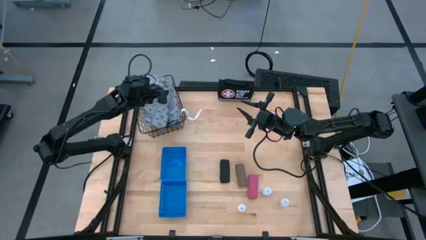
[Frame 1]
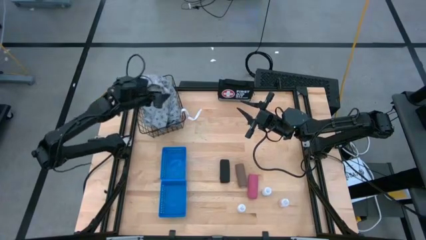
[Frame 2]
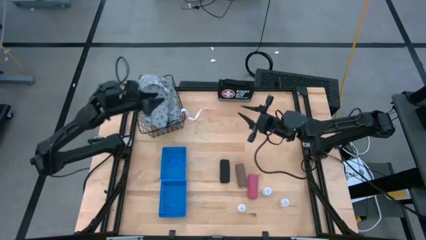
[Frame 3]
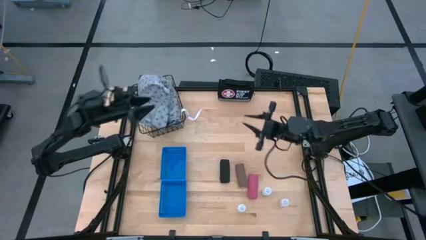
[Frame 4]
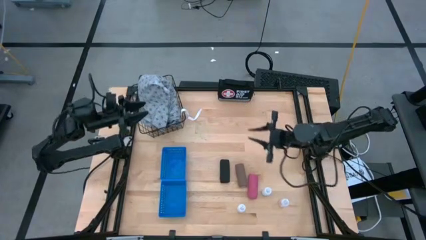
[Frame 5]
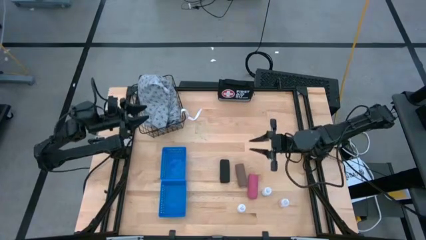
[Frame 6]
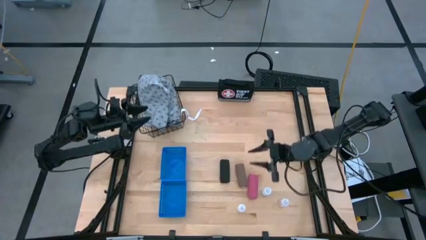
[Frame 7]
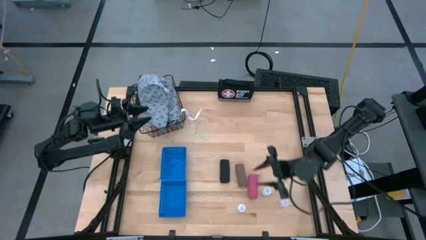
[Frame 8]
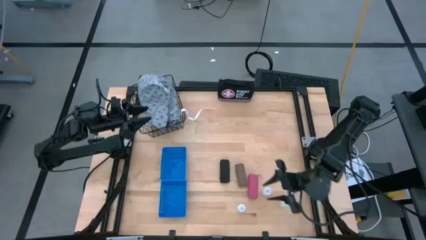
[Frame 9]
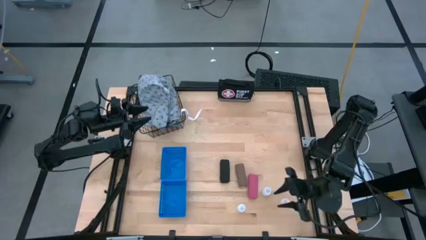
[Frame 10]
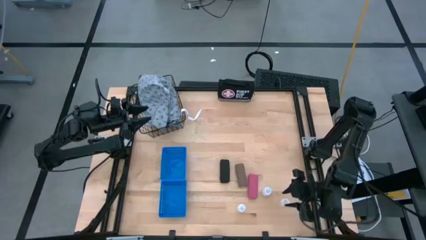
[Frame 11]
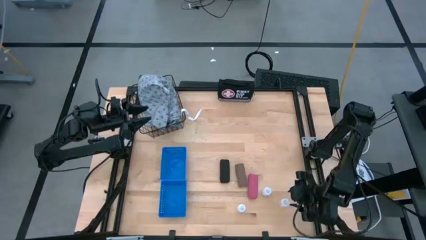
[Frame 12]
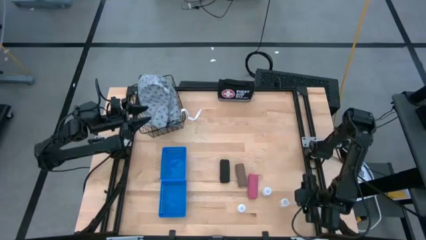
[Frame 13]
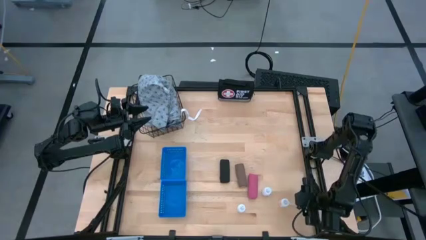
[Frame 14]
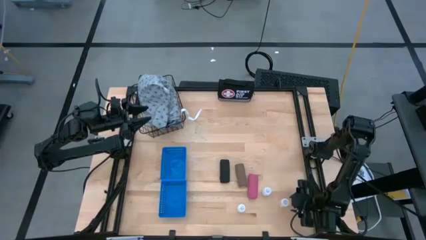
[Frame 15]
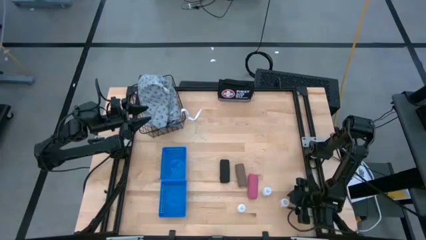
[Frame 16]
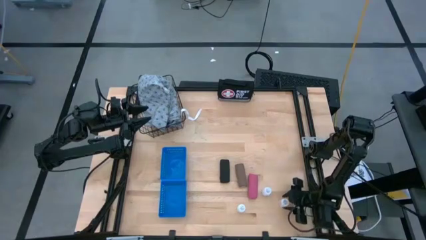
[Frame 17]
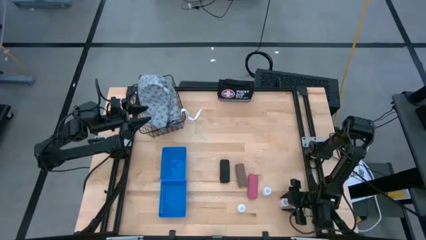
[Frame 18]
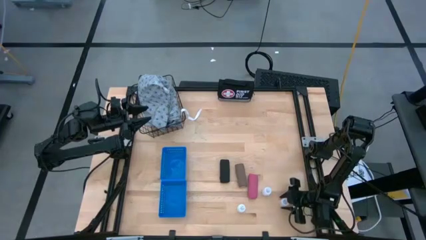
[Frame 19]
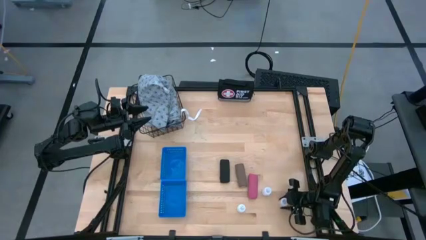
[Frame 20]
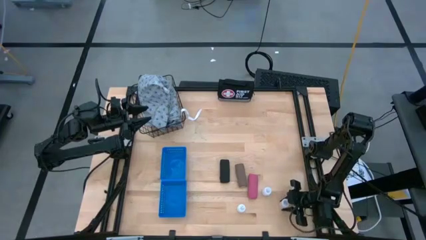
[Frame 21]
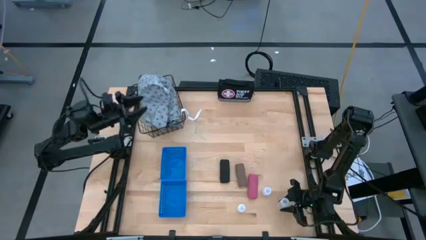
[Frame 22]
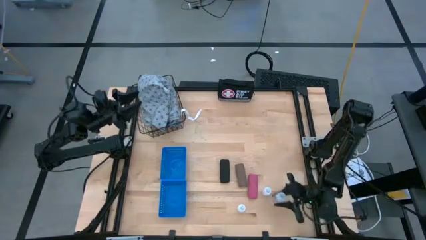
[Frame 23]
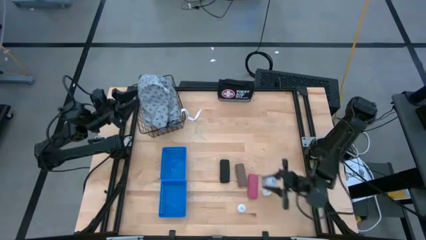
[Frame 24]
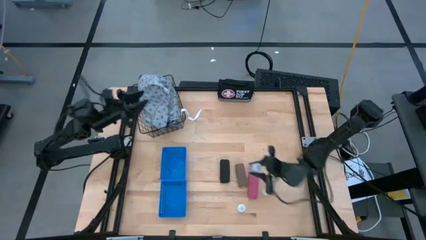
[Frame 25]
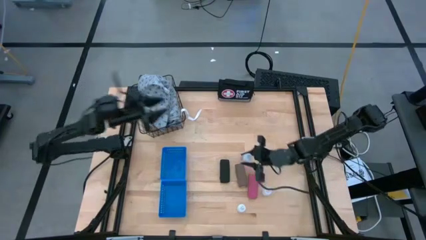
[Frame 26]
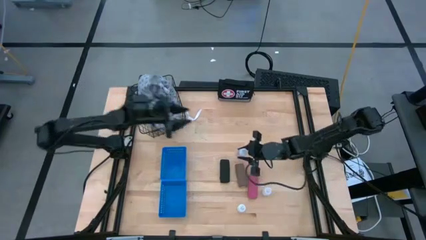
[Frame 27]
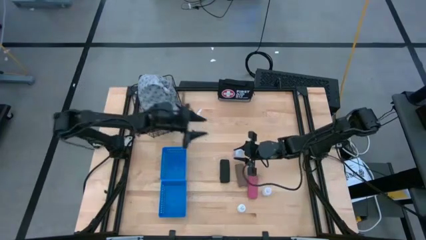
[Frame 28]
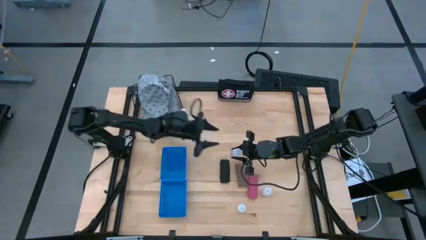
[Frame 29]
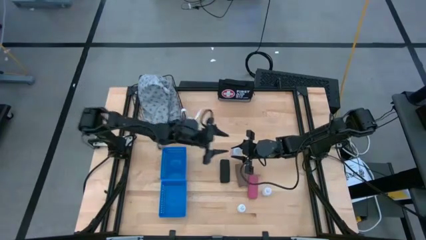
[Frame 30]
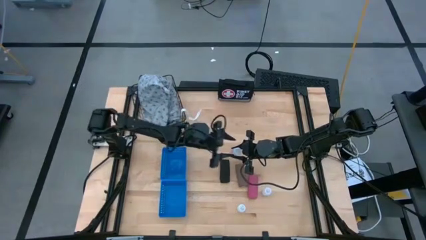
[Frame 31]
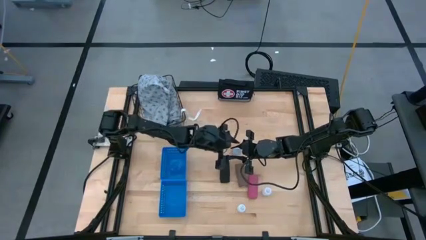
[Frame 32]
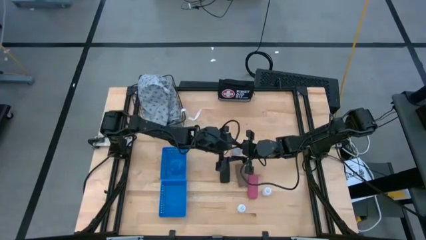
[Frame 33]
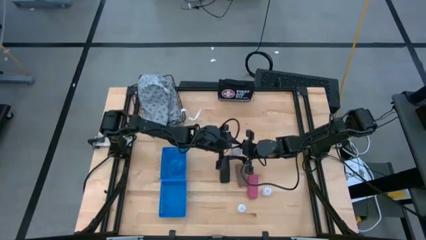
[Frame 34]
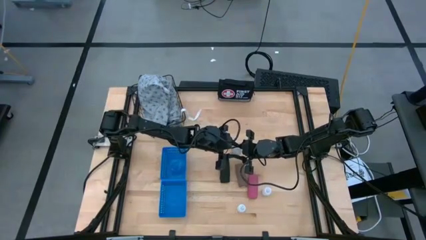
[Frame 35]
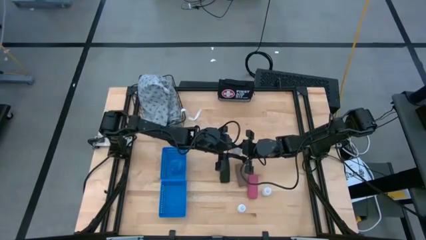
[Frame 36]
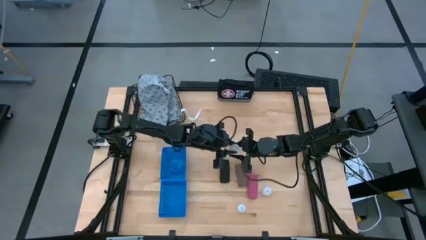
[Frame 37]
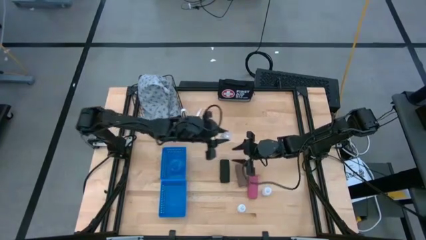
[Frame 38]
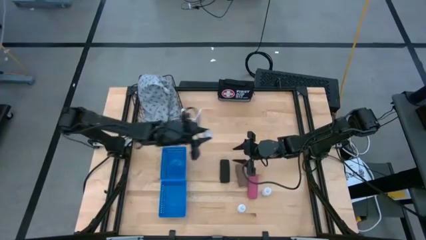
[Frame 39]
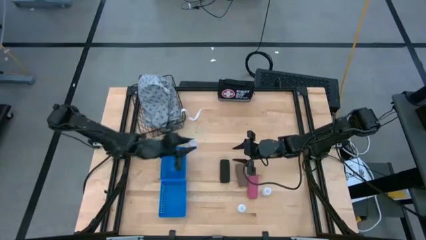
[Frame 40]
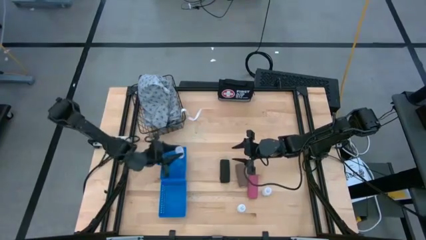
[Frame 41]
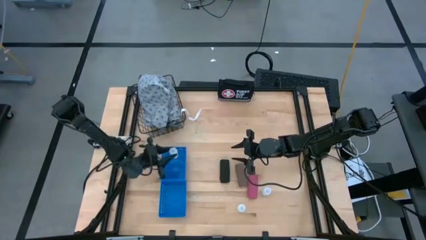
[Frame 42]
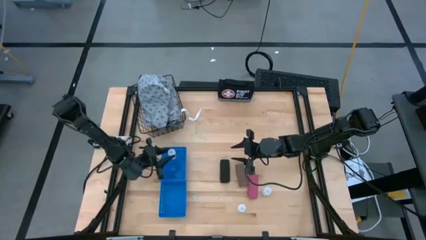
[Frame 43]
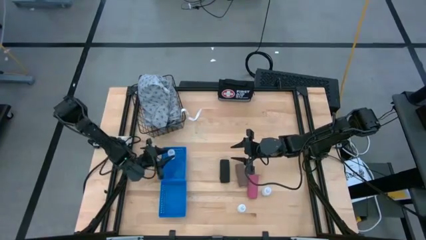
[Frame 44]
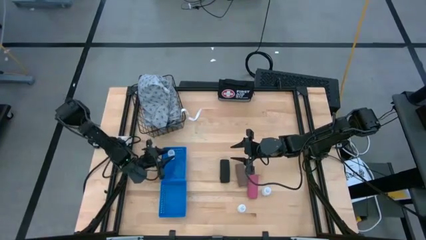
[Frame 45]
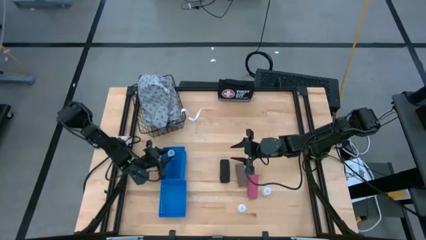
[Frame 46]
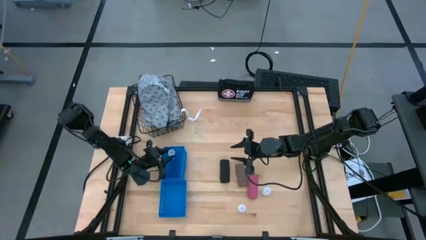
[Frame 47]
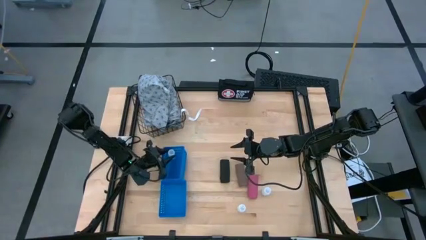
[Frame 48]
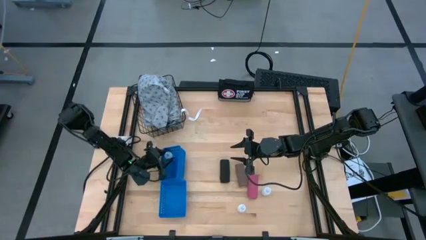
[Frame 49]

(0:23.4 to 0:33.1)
Task: Pick & Place Medicine items
Put the bottom right white pill bottle into the top blue basket
